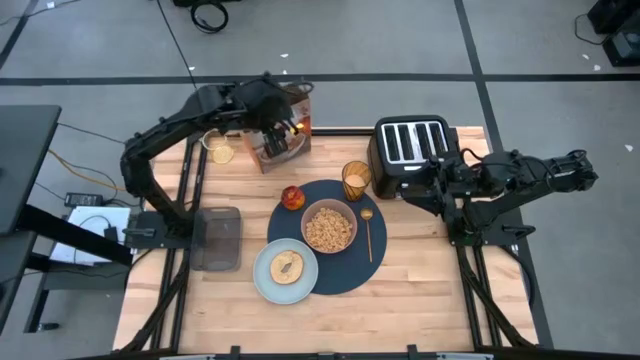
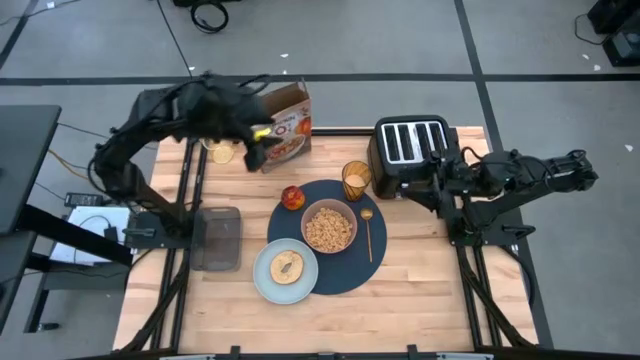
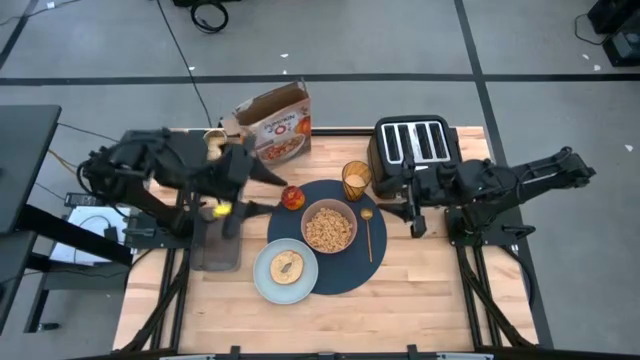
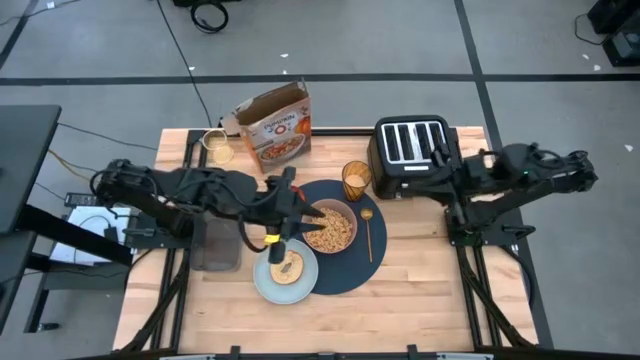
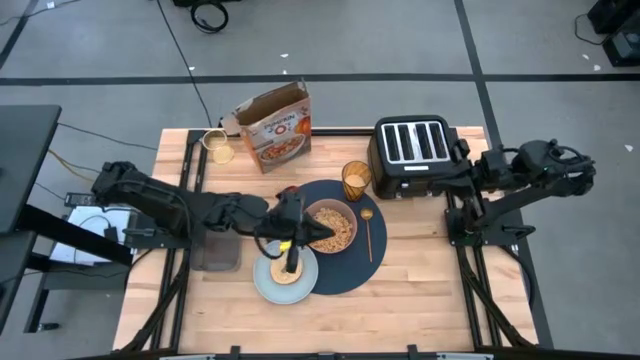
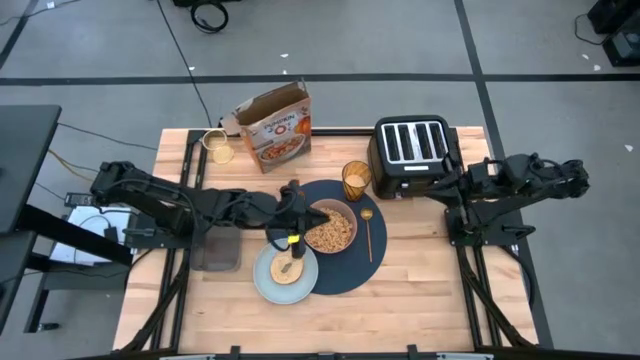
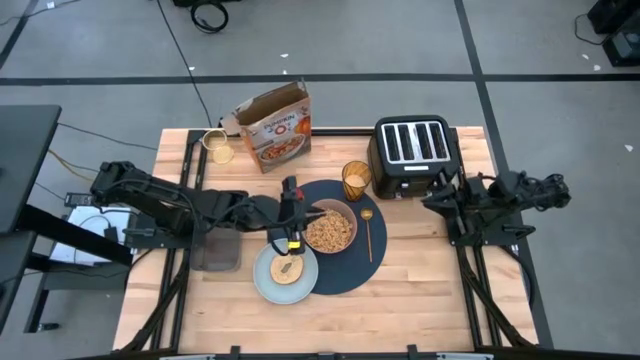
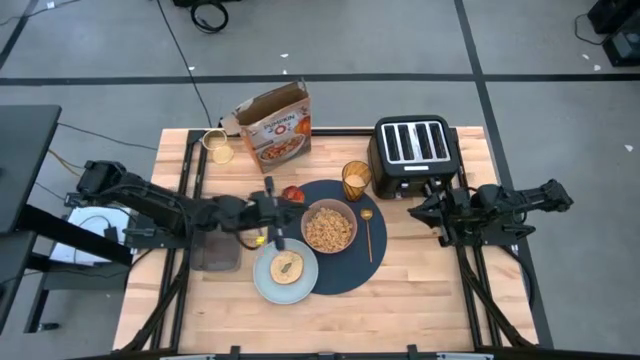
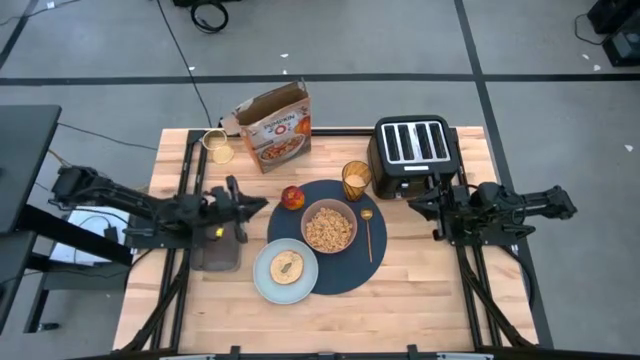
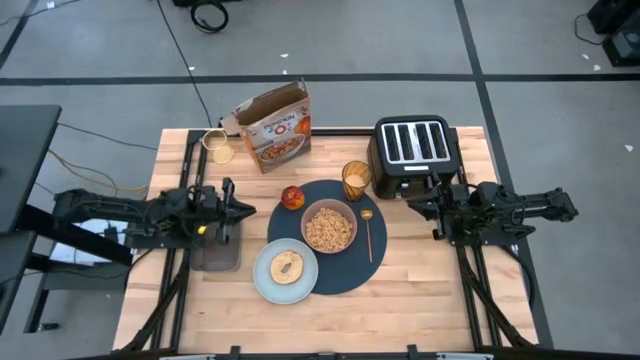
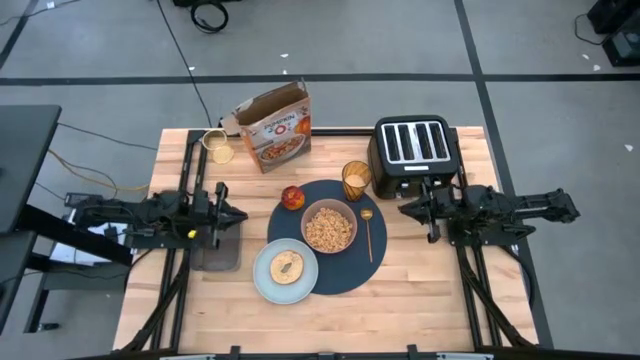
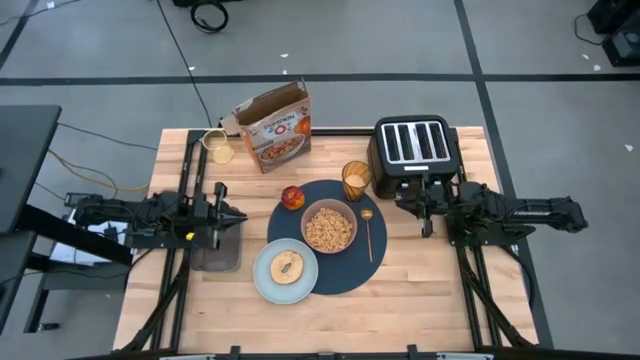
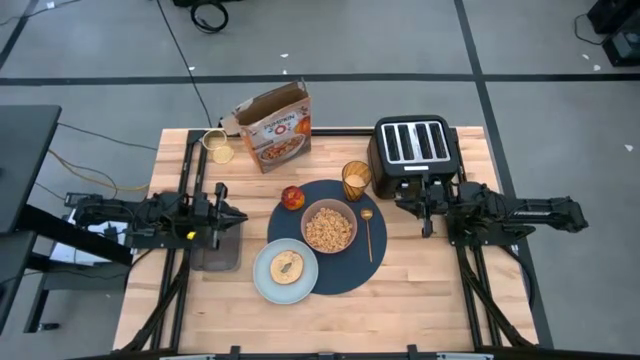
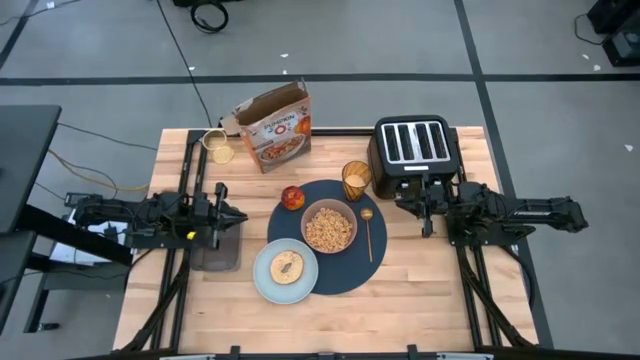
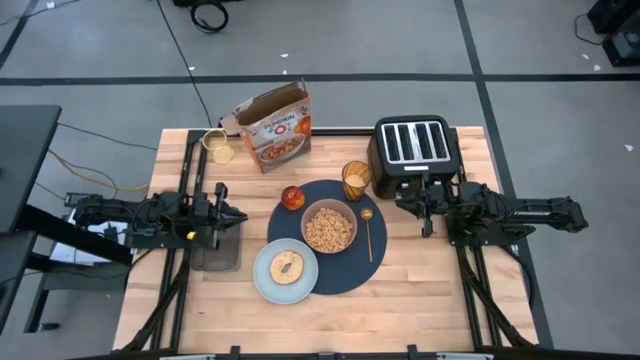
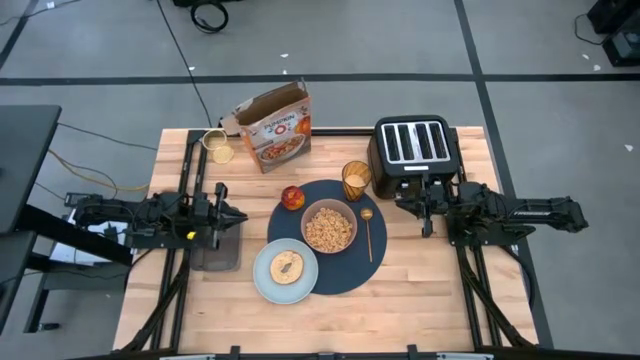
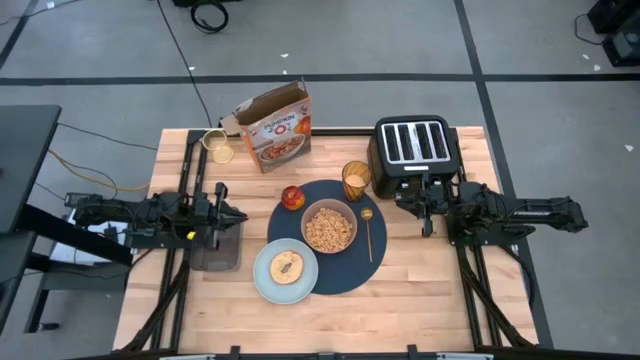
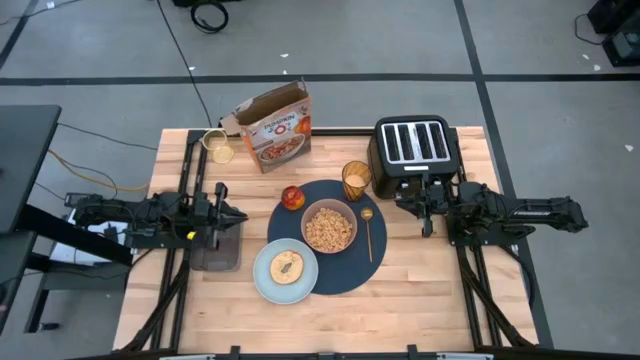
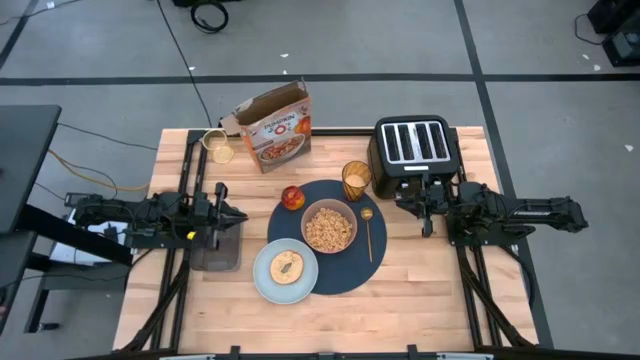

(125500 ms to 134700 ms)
Task: Arrange a breakfast setting
Return to Home Position

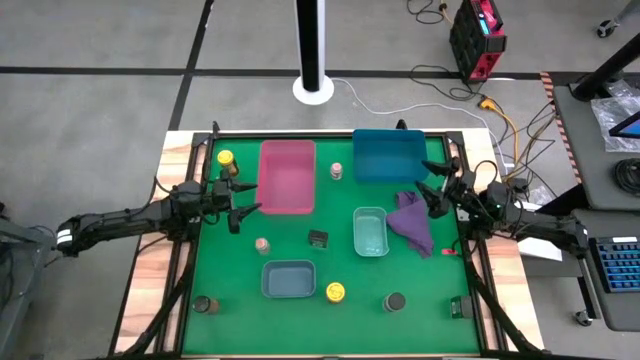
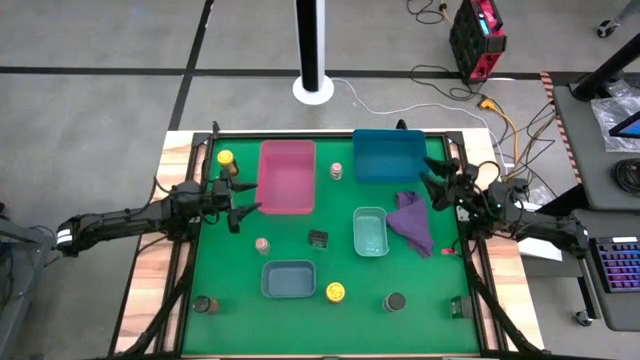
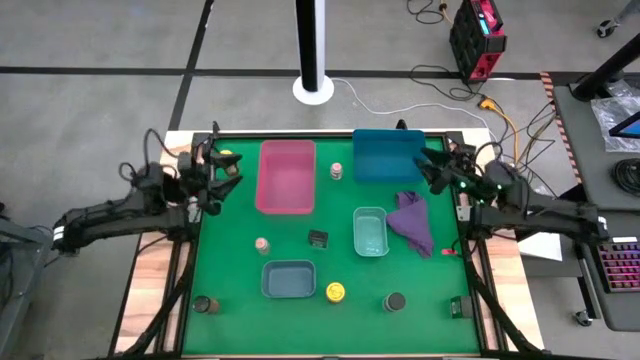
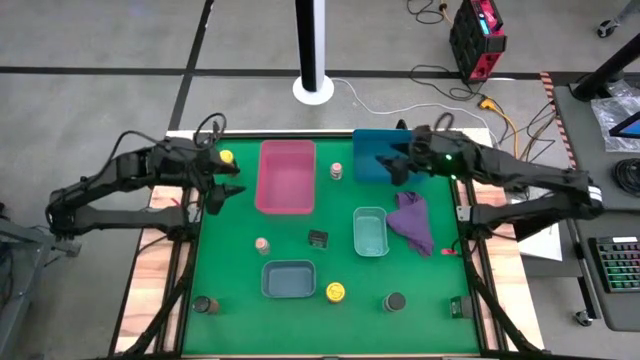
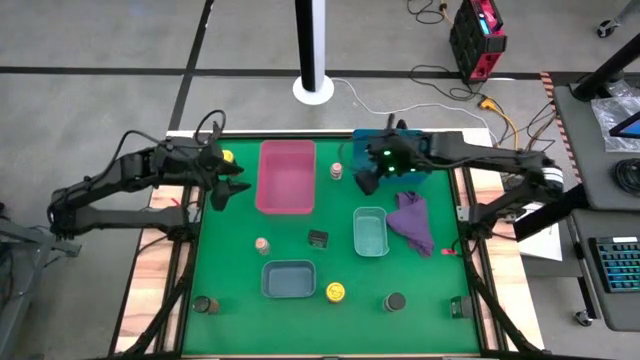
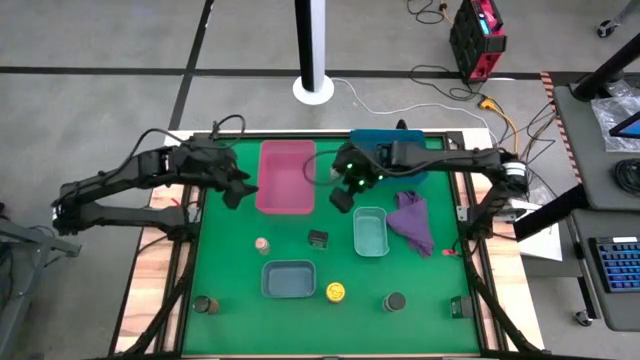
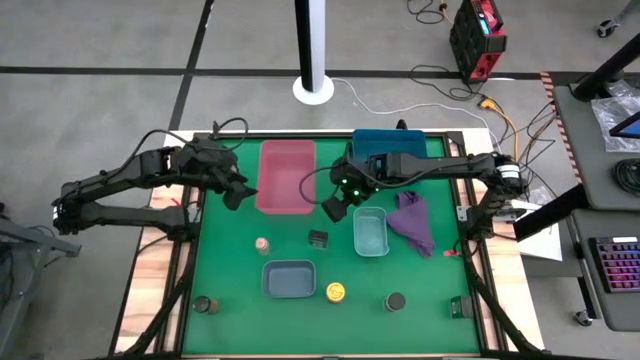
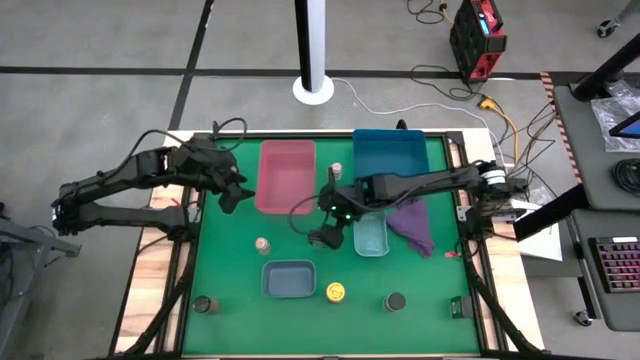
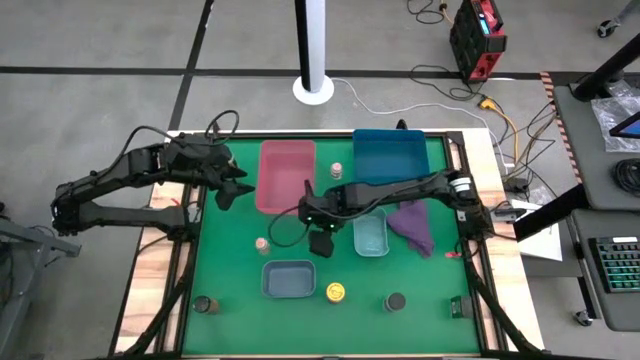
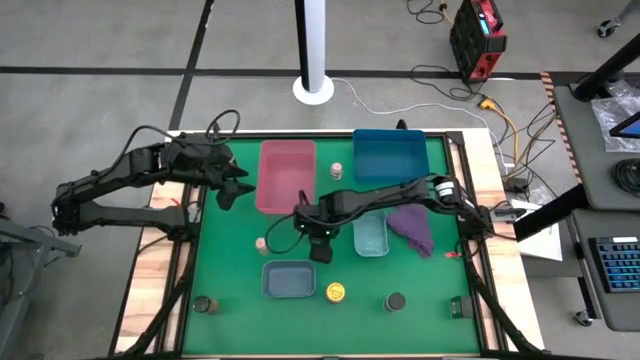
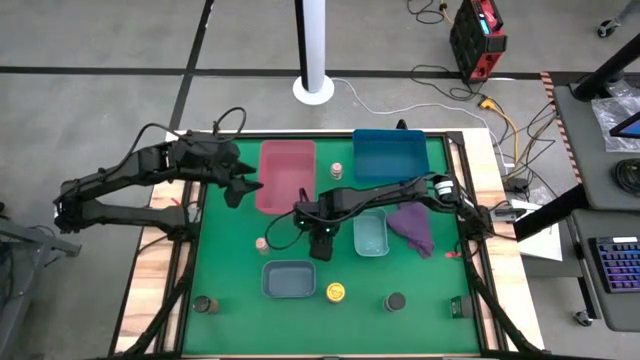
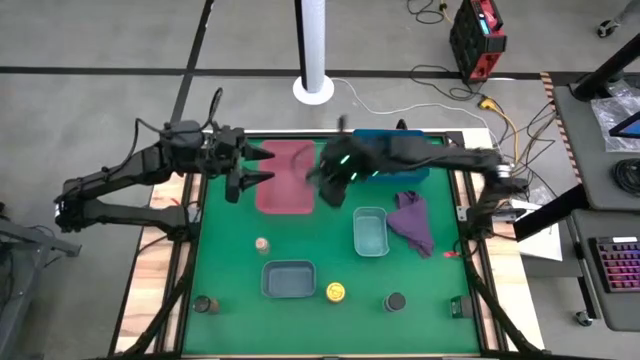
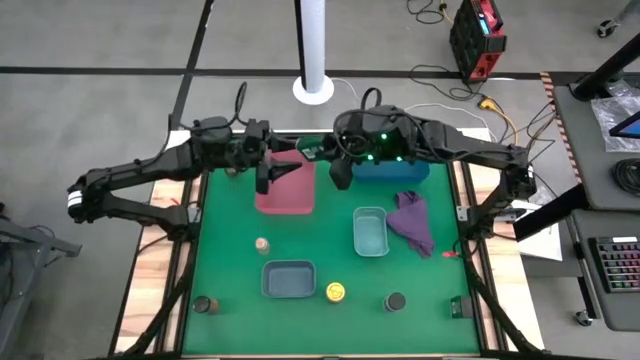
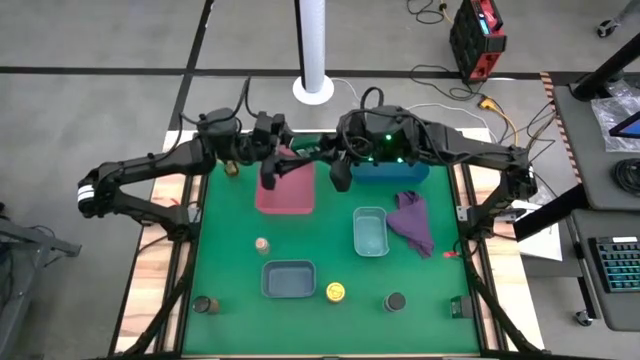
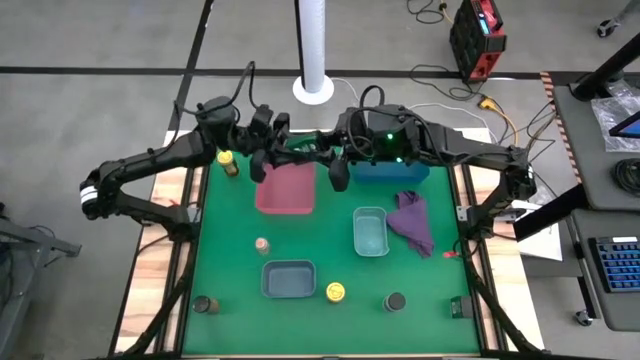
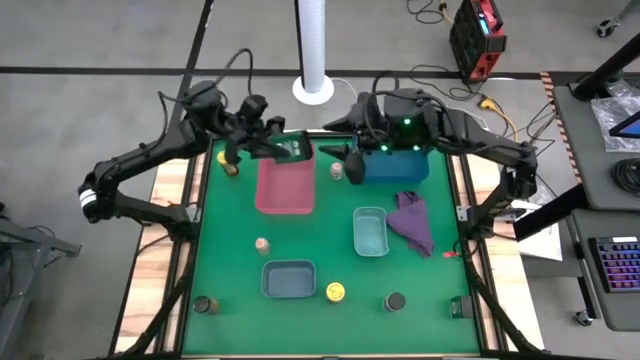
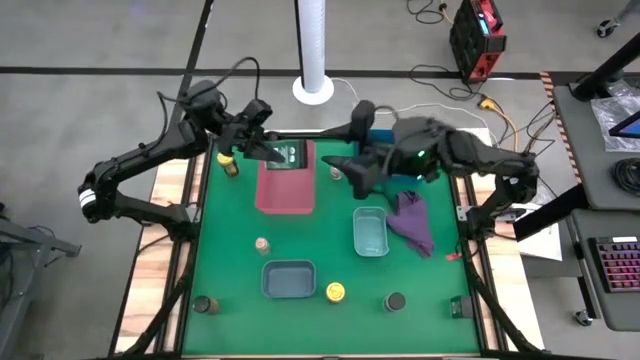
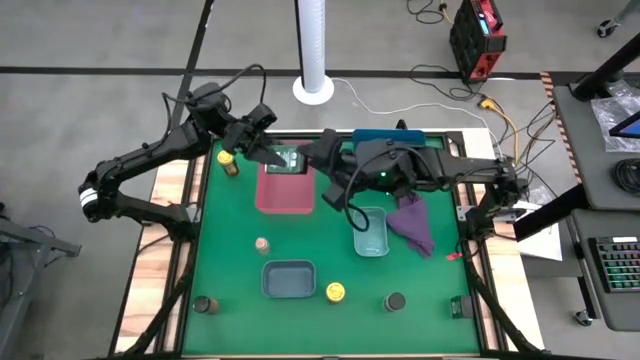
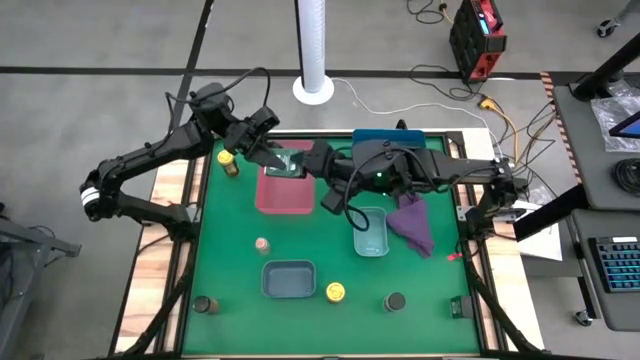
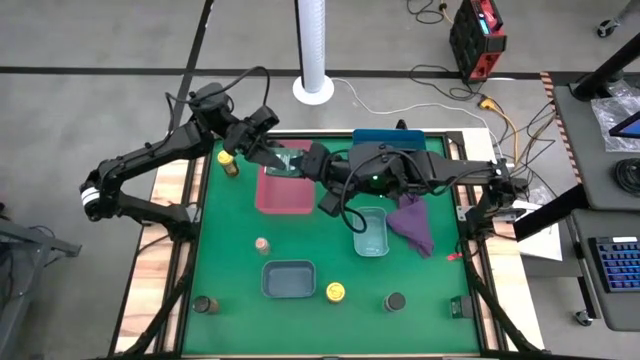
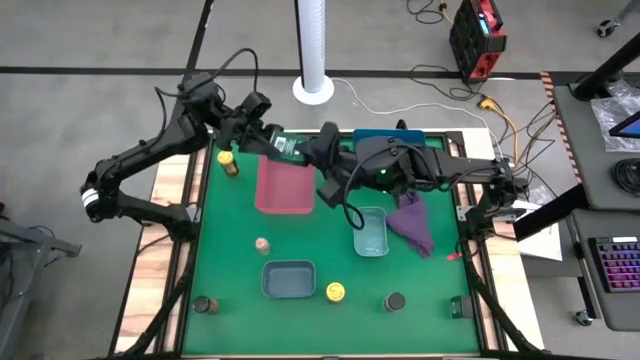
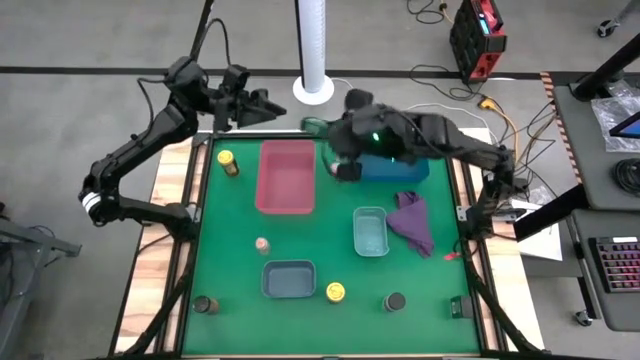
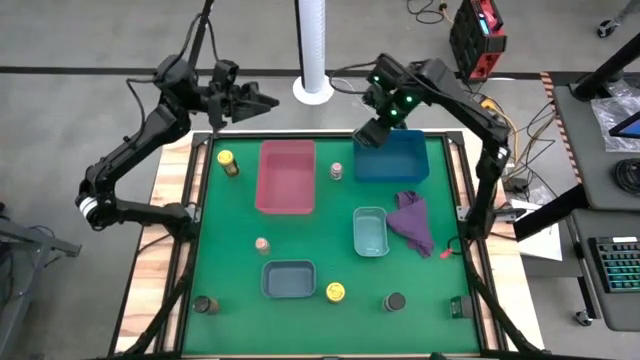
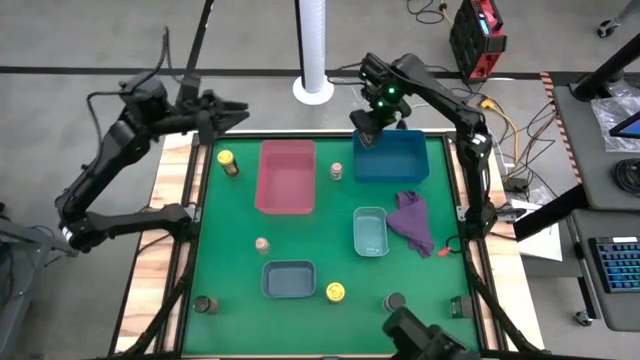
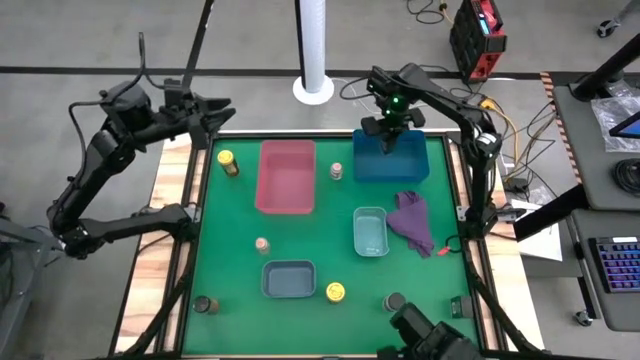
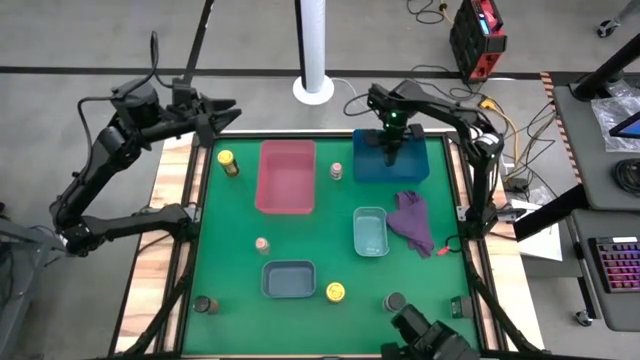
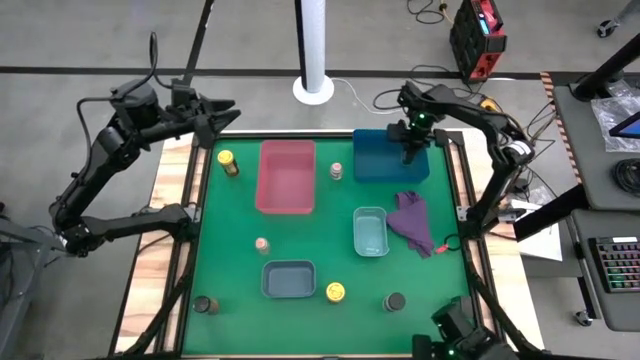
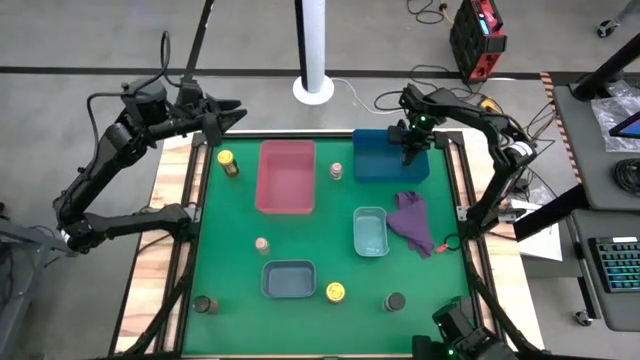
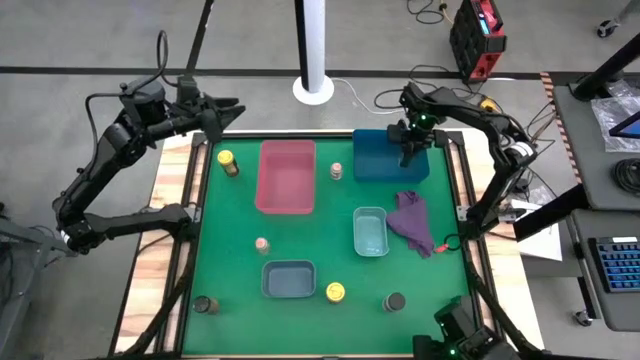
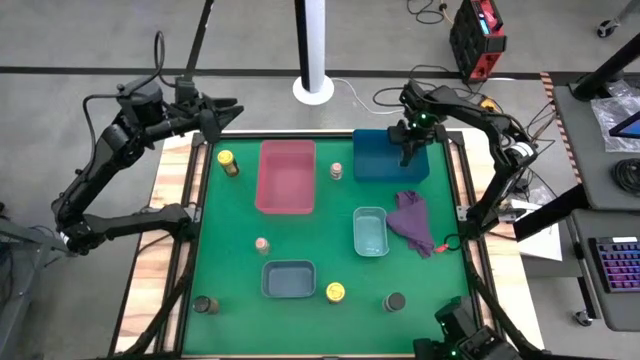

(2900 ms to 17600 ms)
Task: Sort spices by type
Put the left black seasoning can into the large blue bin
